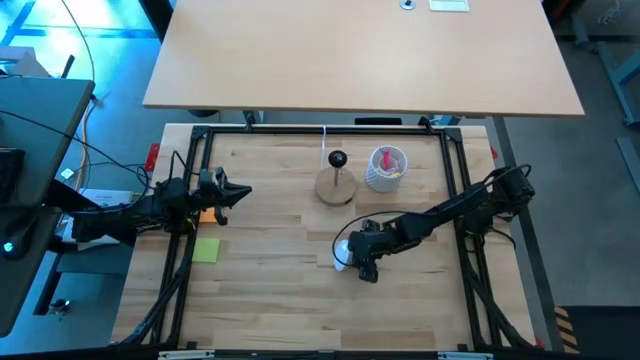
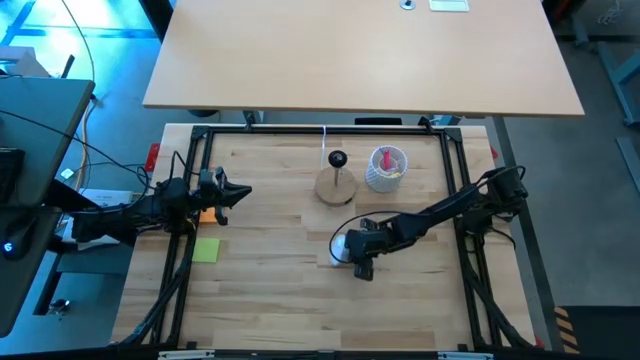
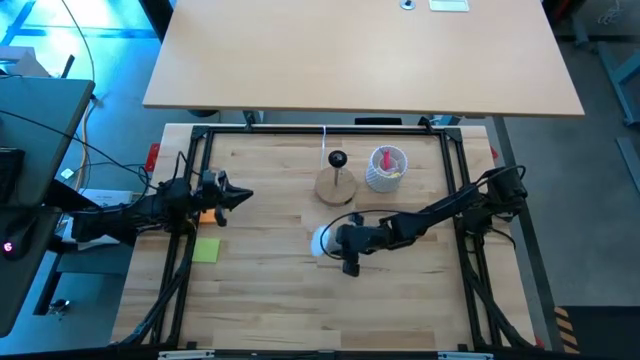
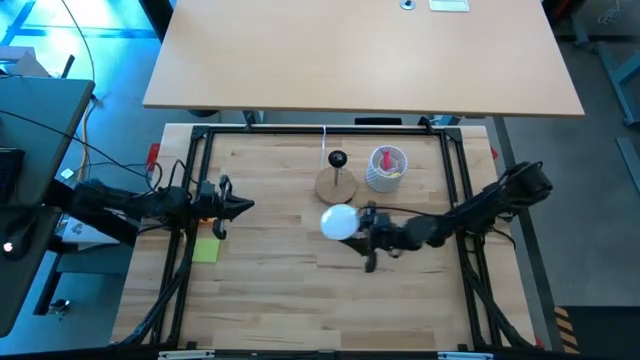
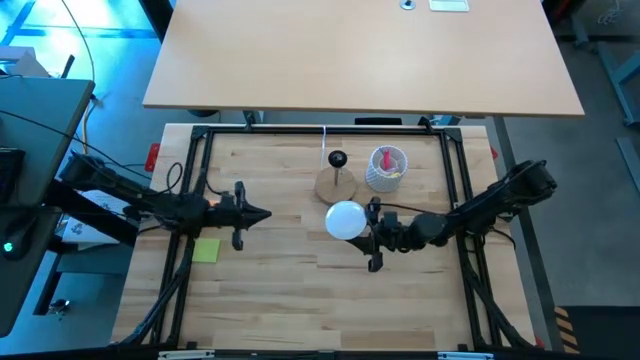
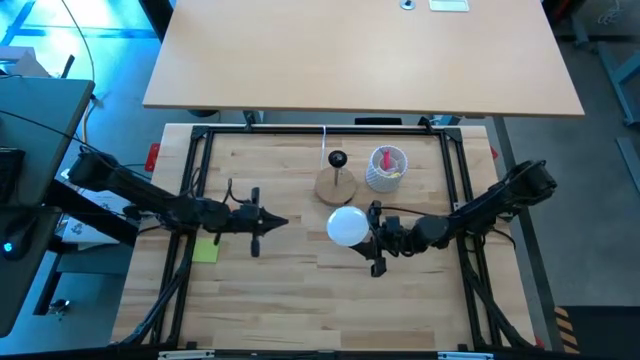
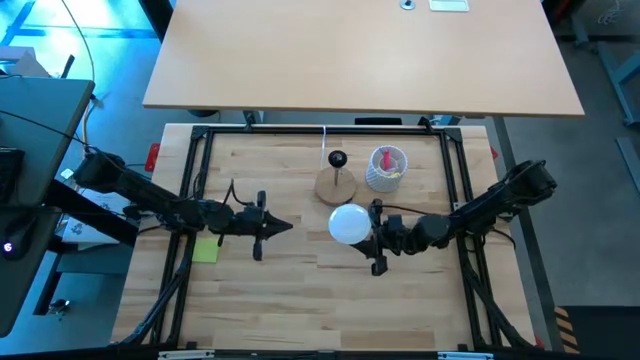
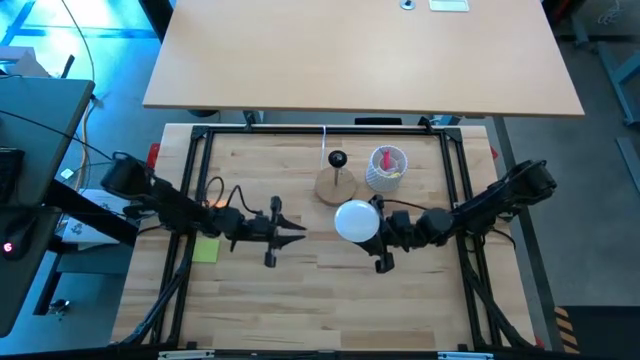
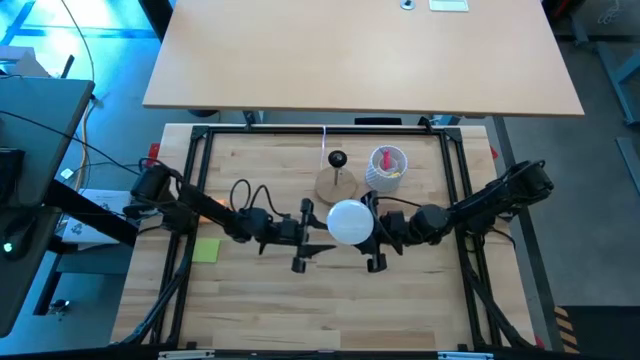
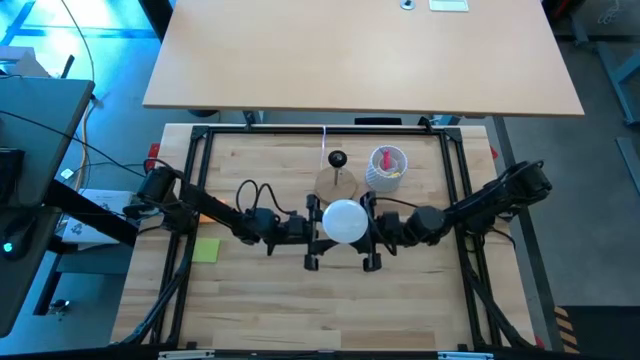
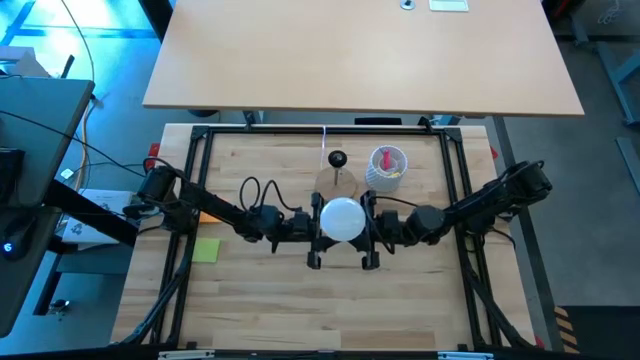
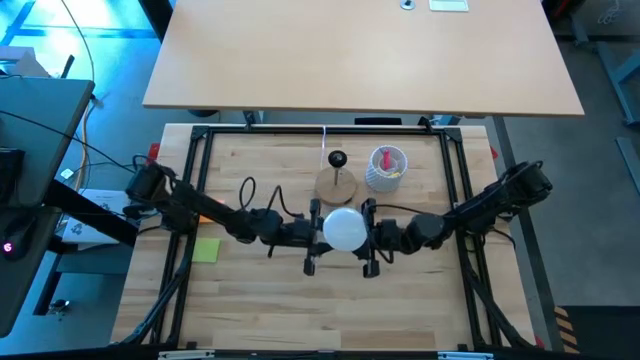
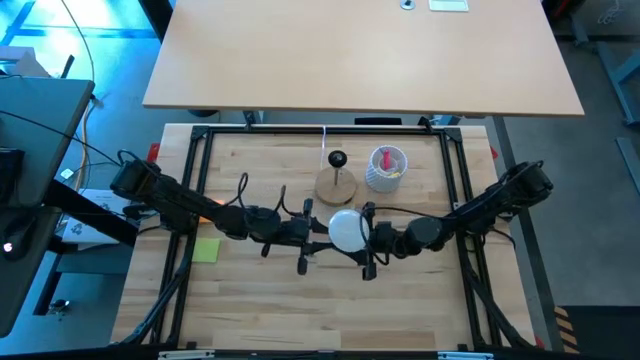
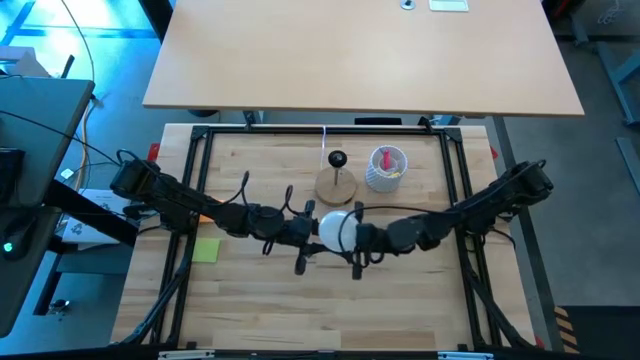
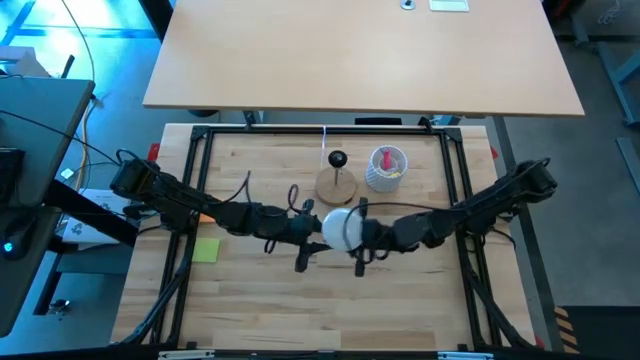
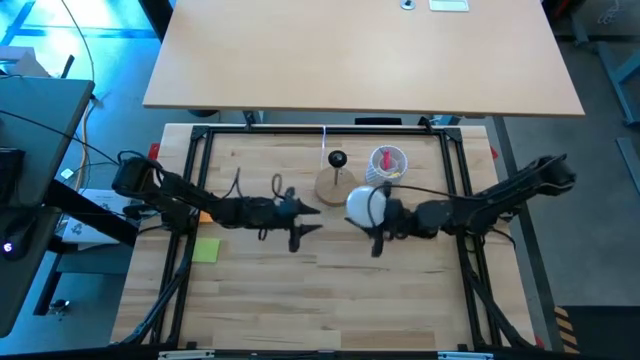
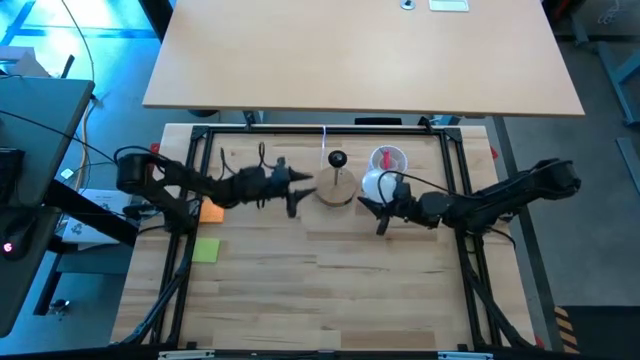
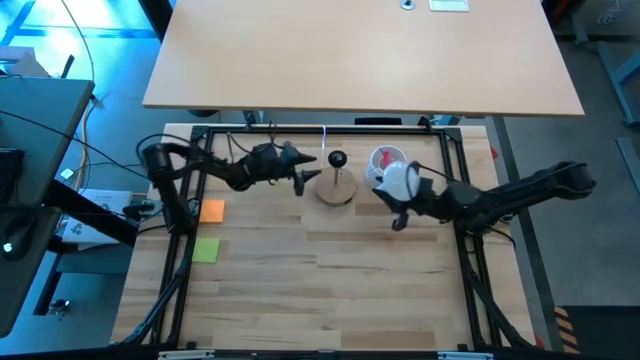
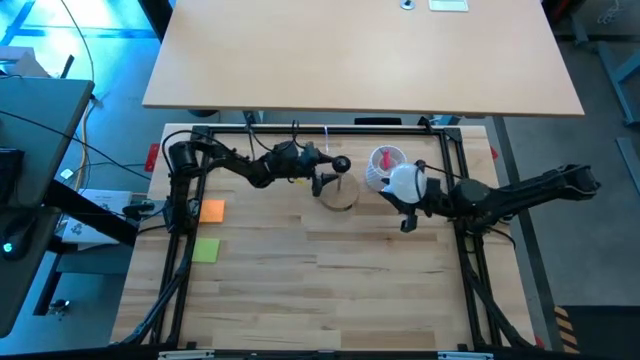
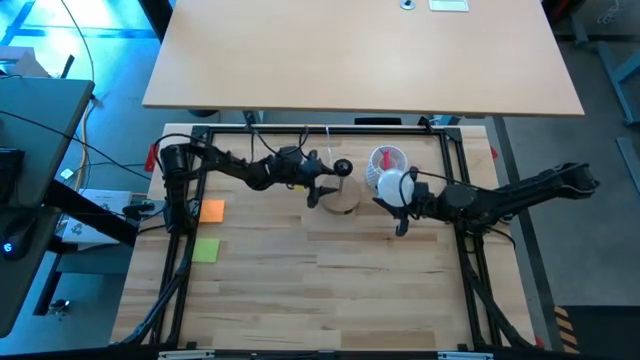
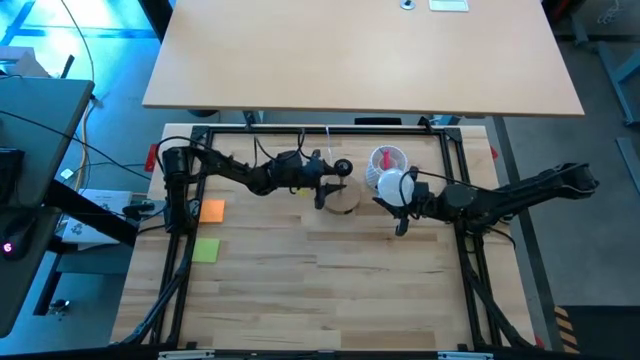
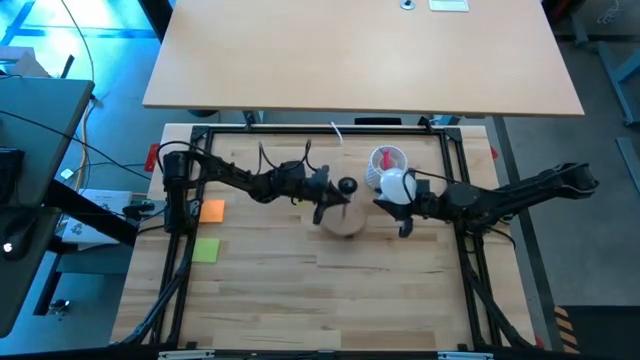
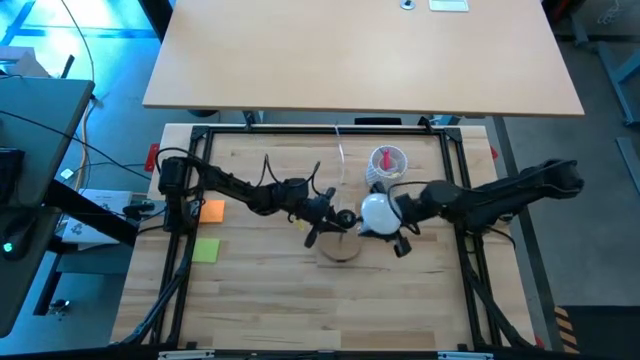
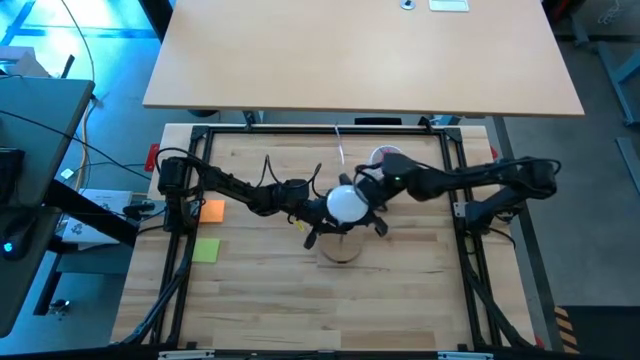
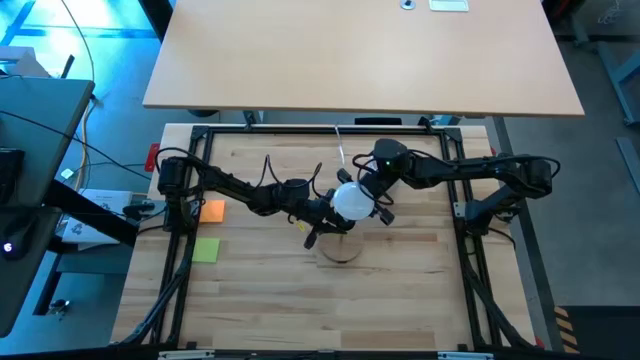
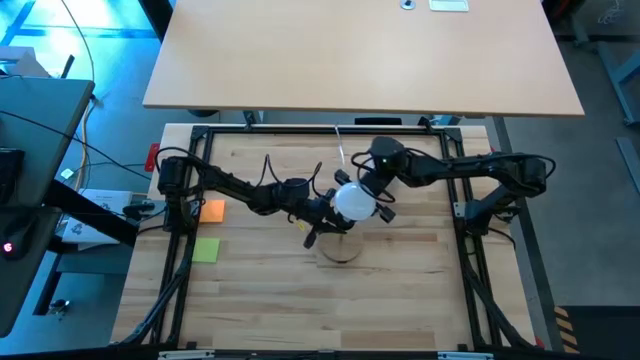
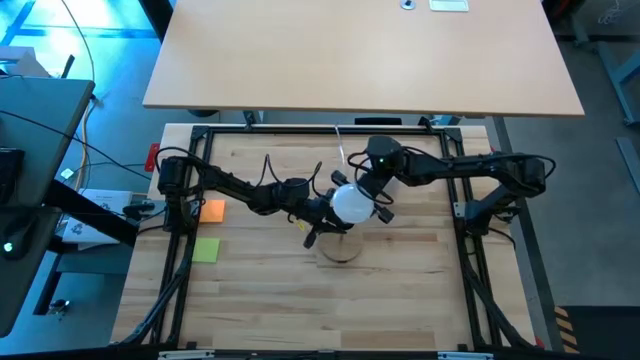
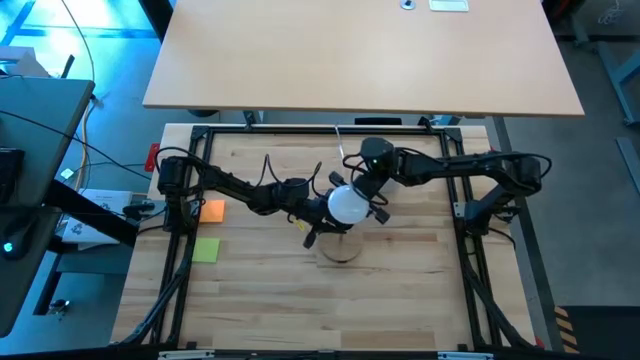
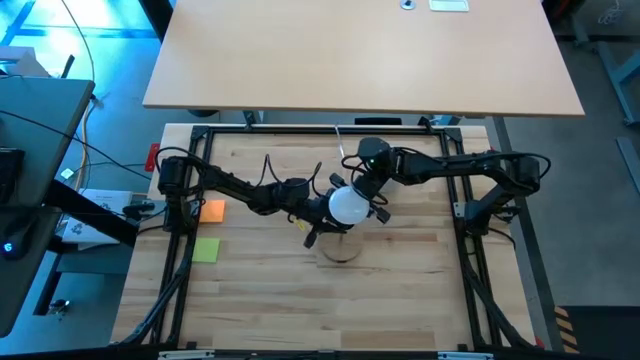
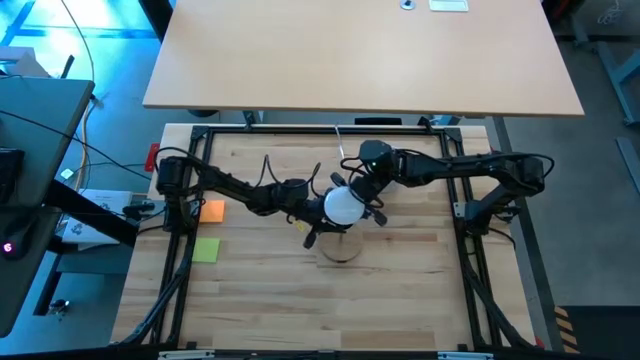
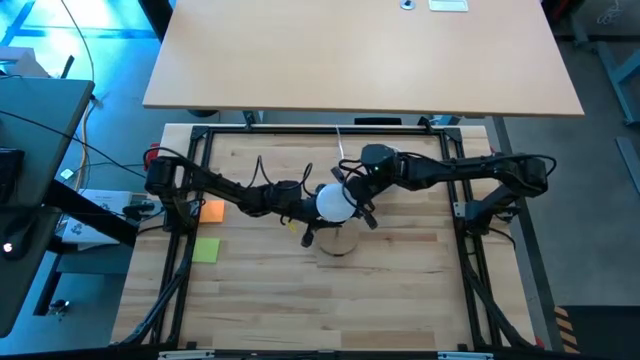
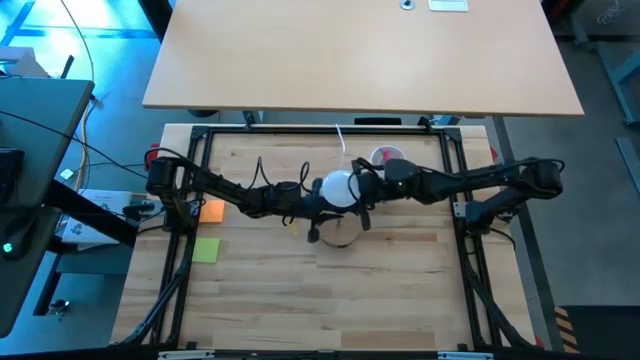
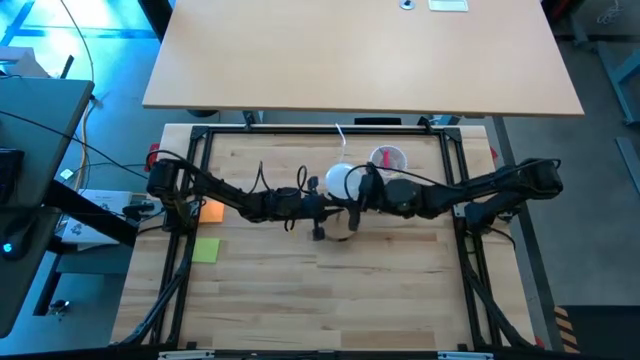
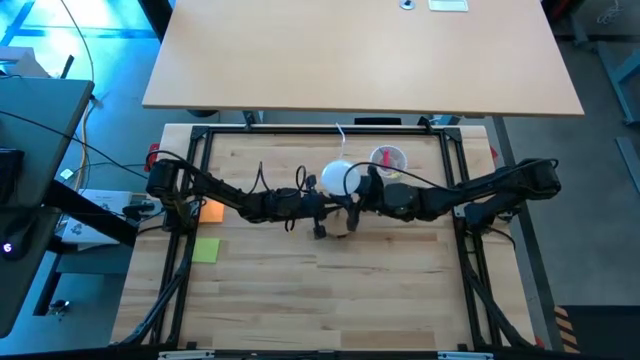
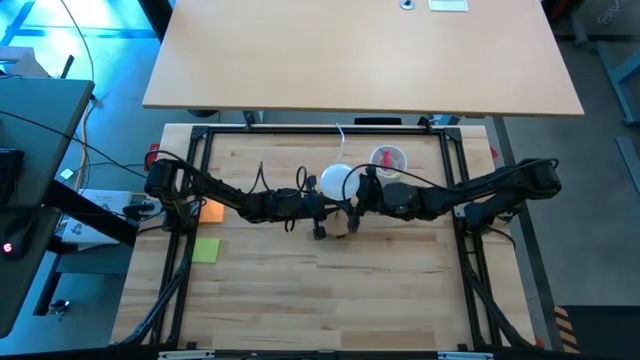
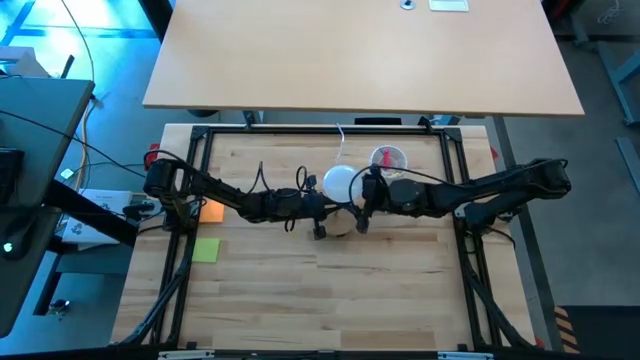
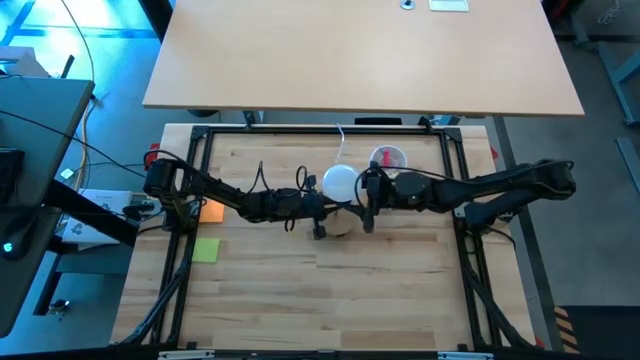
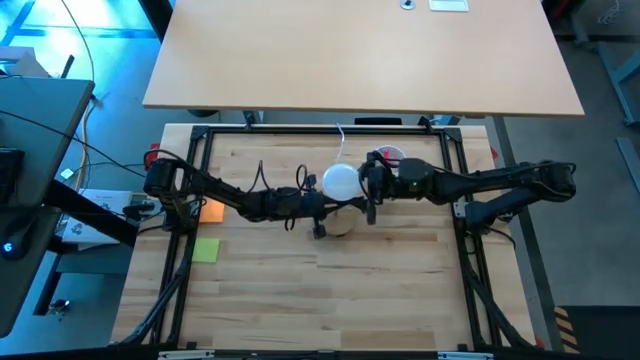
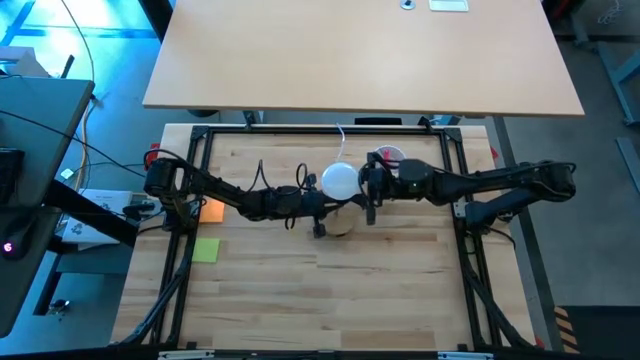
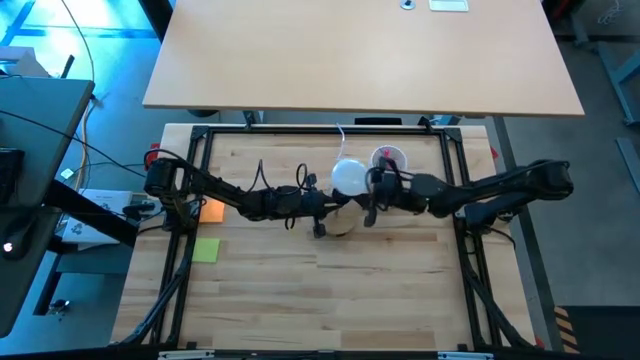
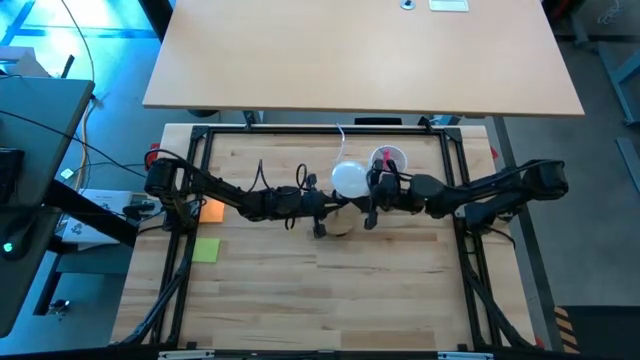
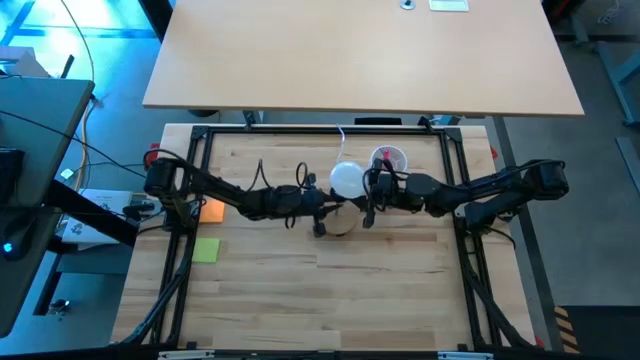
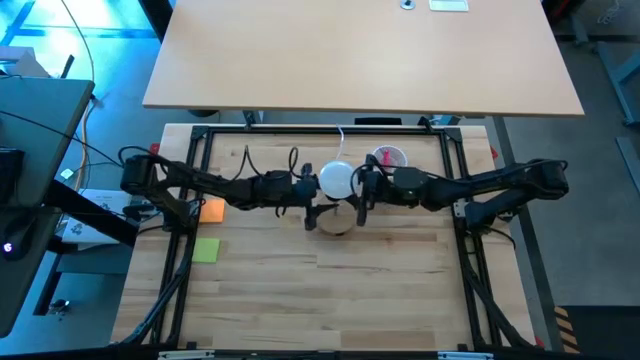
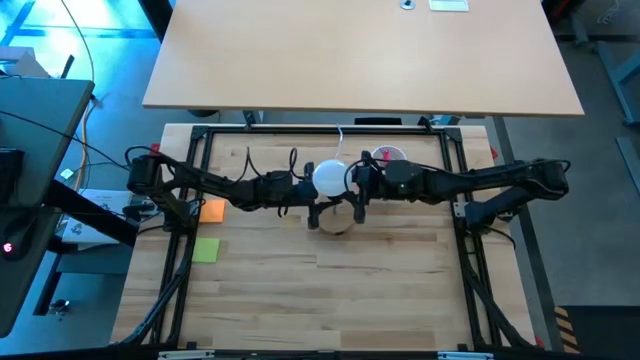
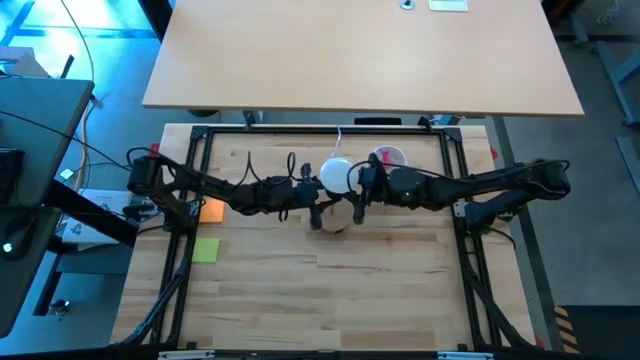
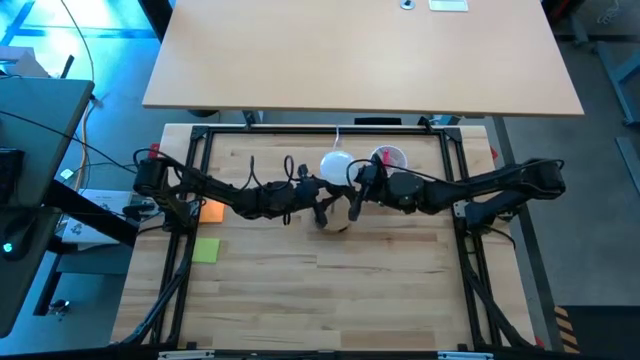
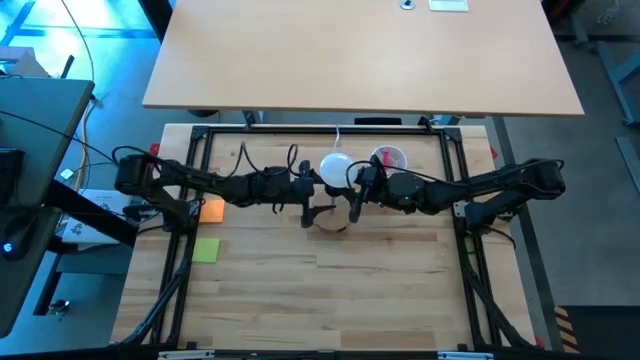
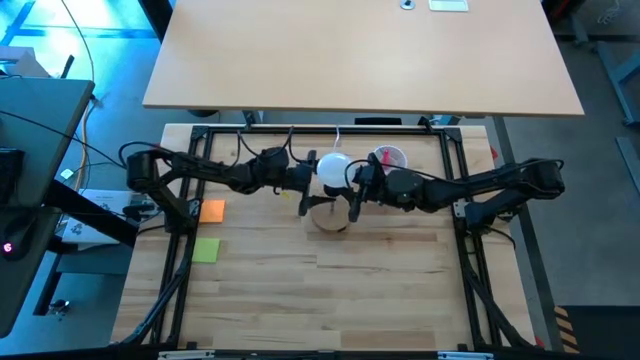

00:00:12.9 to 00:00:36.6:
Task: Screw lightbulb
Insert the white lightbulb into the brown lamp
